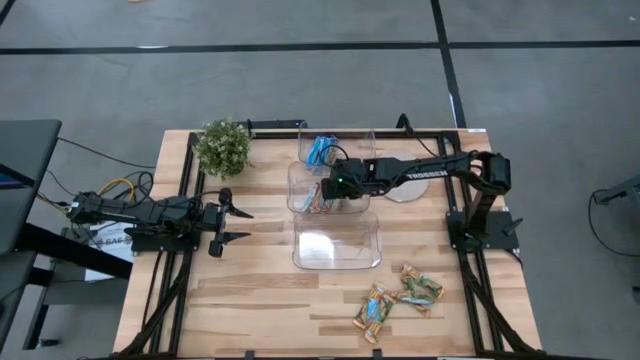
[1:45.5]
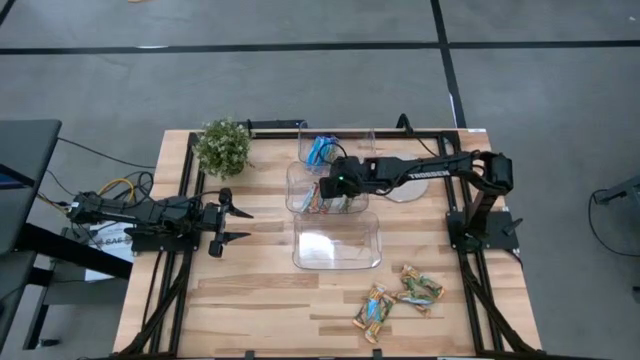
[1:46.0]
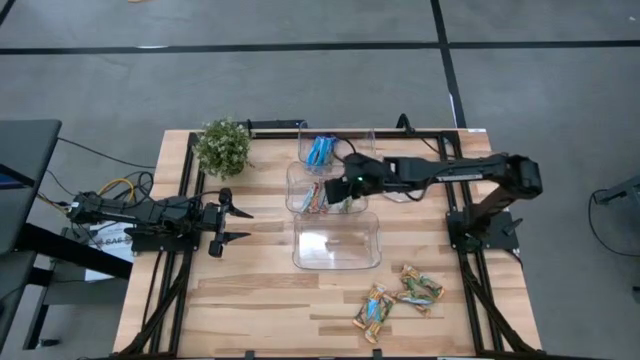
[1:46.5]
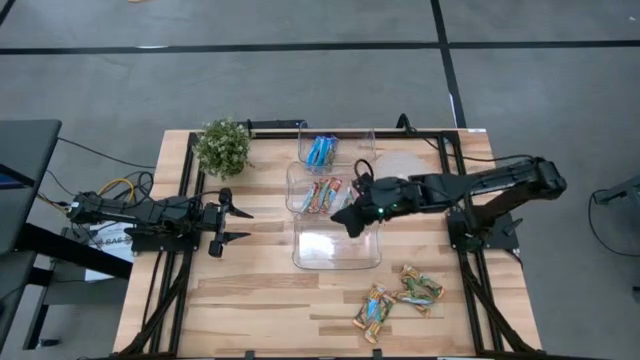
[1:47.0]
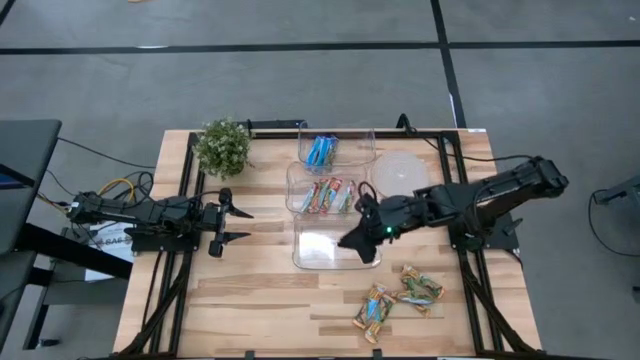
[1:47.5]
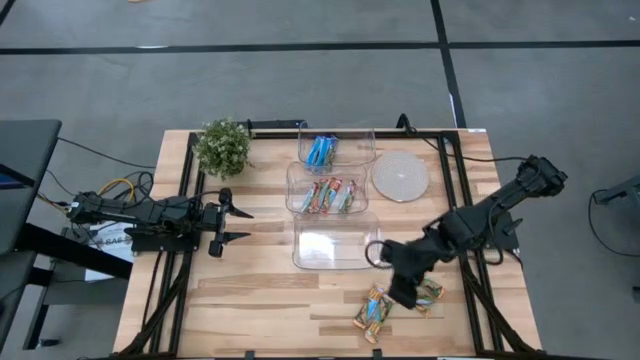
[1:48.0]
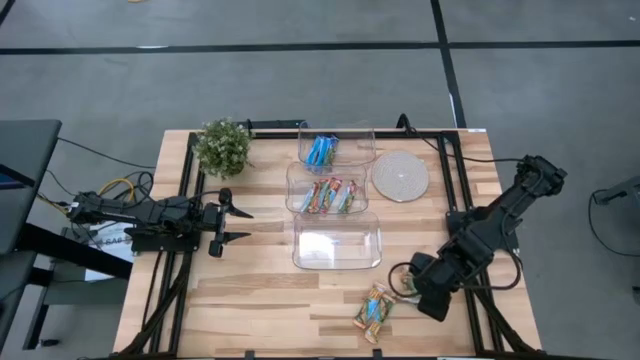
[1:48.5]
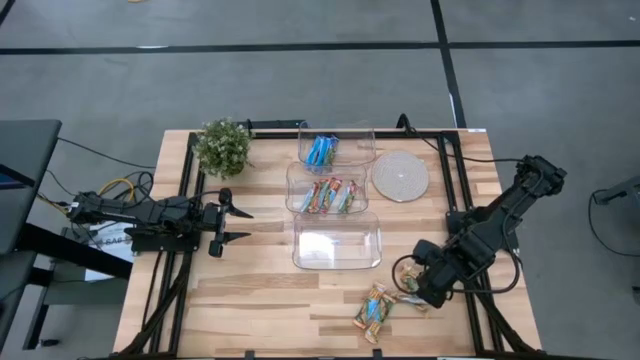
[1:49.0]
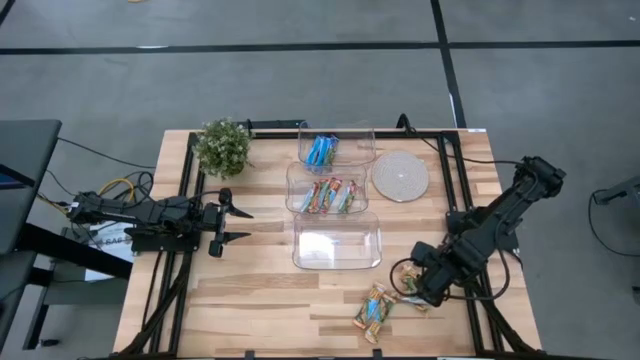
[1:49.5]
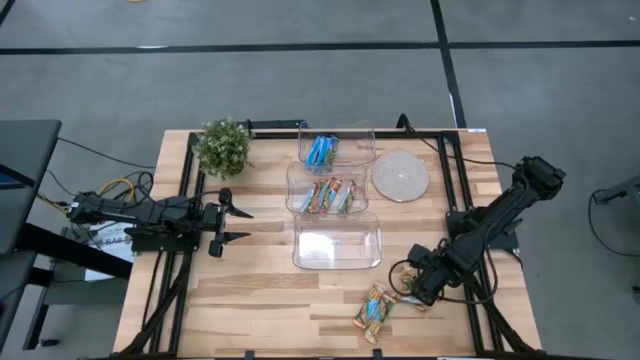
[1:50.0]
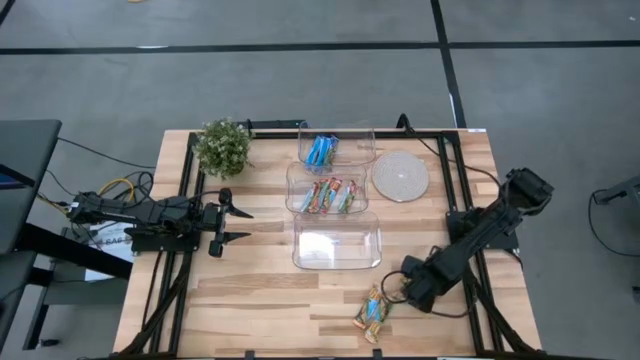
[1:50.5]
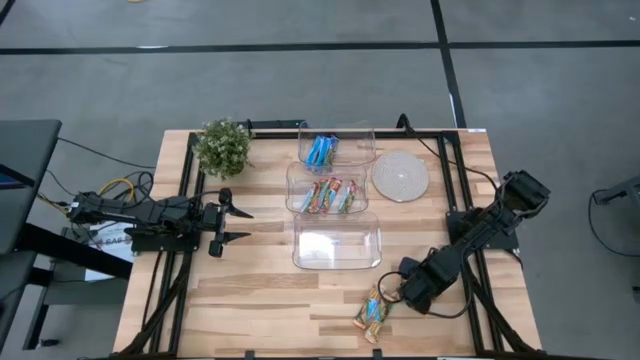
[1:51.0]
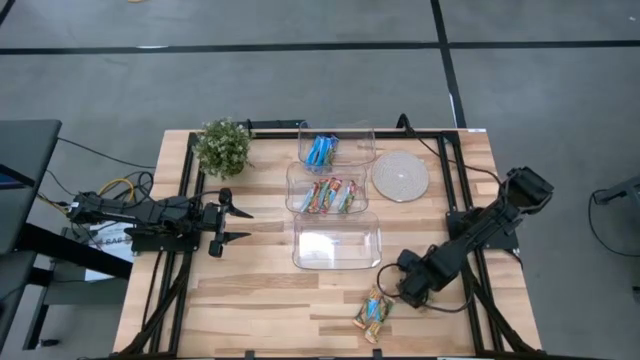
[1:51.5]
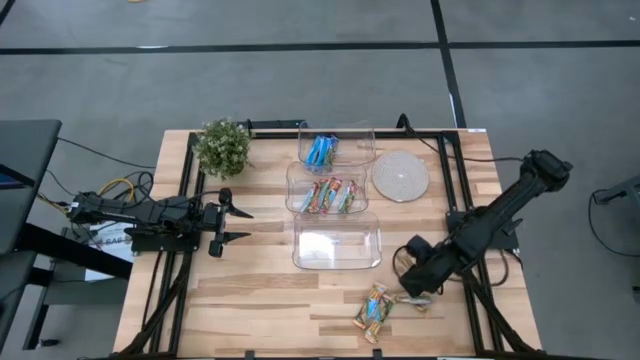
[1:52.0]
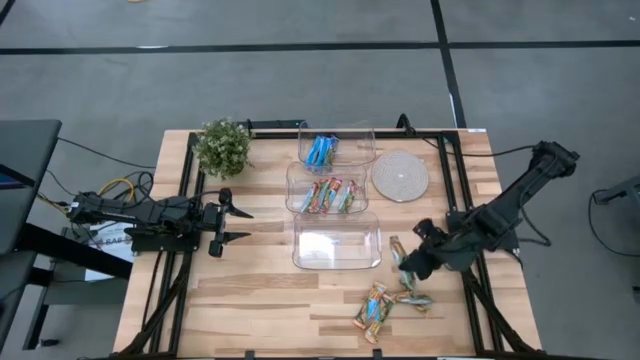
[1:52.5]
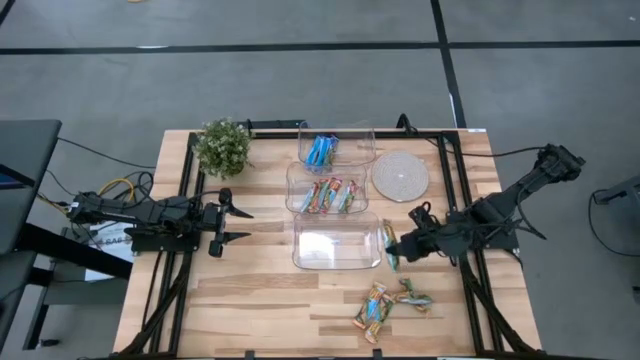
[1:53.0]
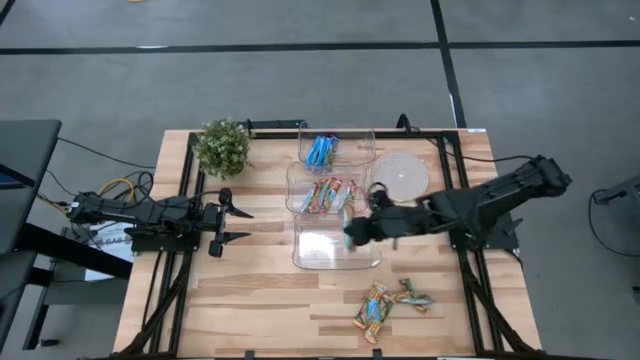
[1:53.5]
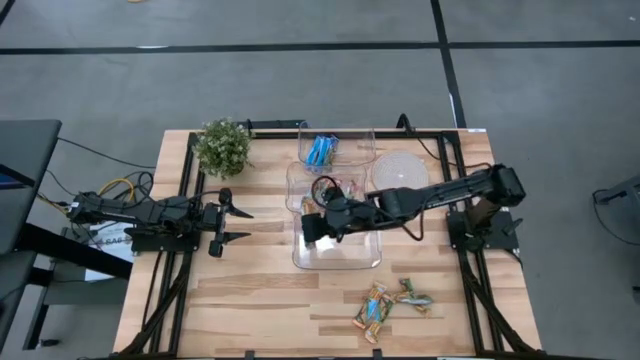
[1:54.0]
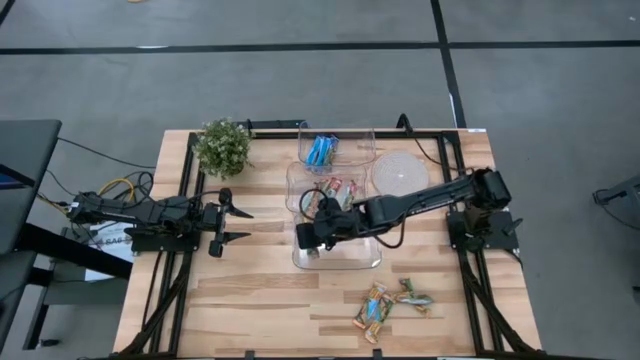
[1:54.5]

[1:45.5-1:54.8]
Task: Pick and place Granola Bars by type
Put the yellow granola bar into the bottom transparent bin

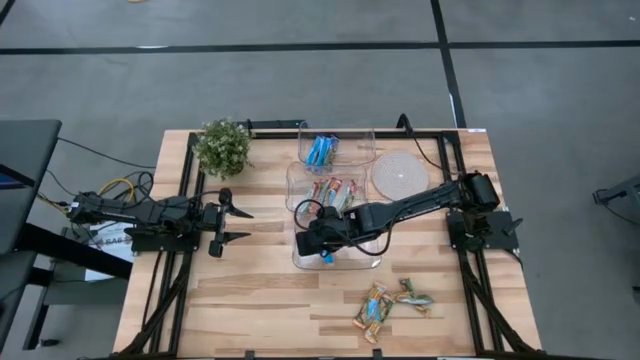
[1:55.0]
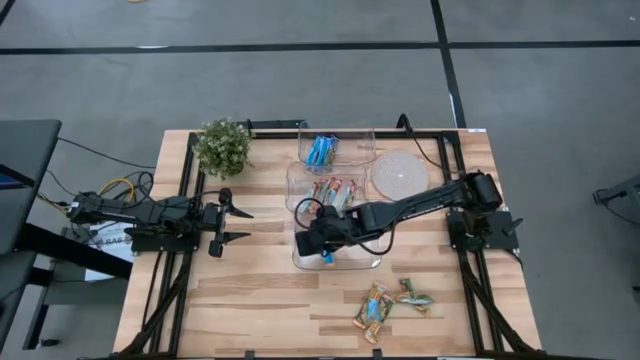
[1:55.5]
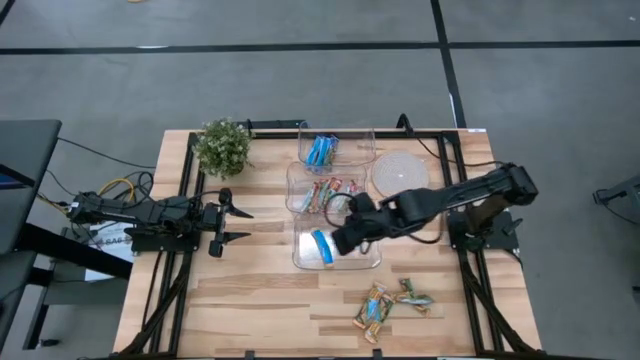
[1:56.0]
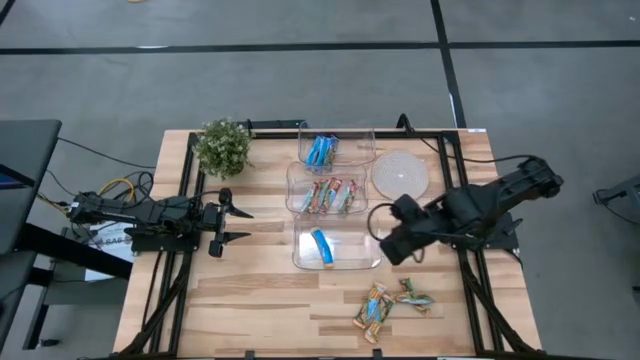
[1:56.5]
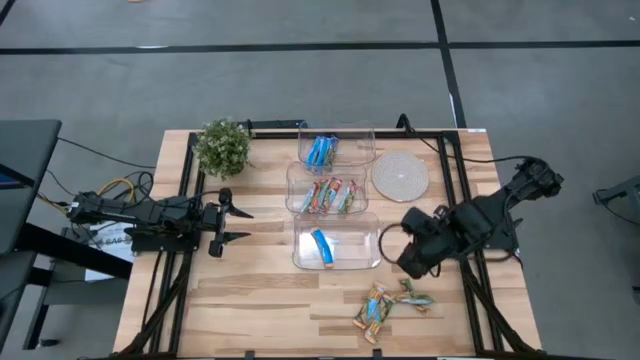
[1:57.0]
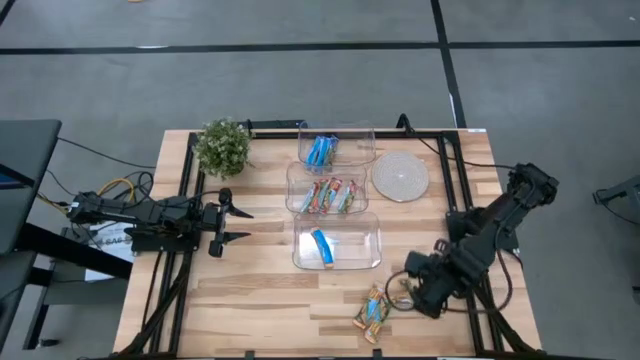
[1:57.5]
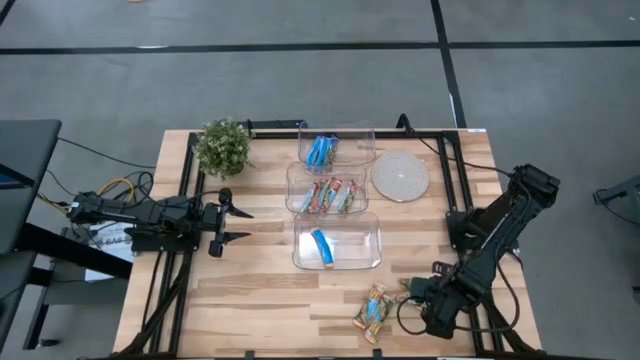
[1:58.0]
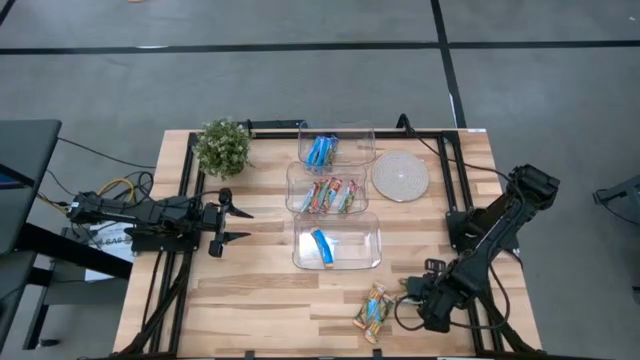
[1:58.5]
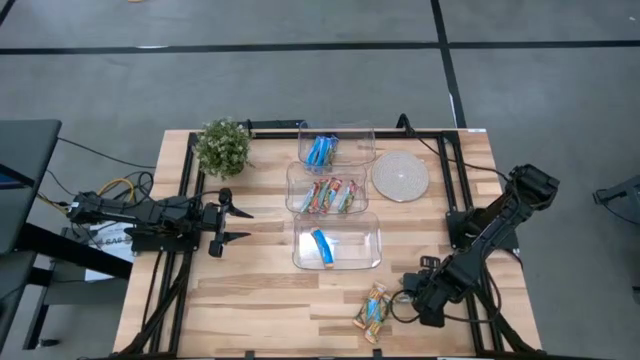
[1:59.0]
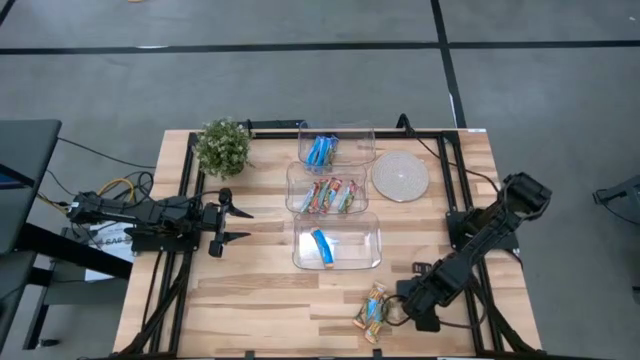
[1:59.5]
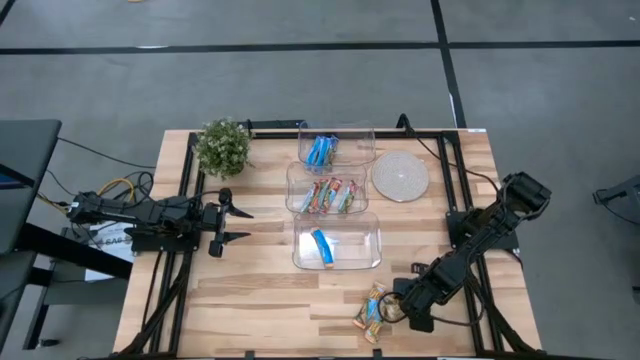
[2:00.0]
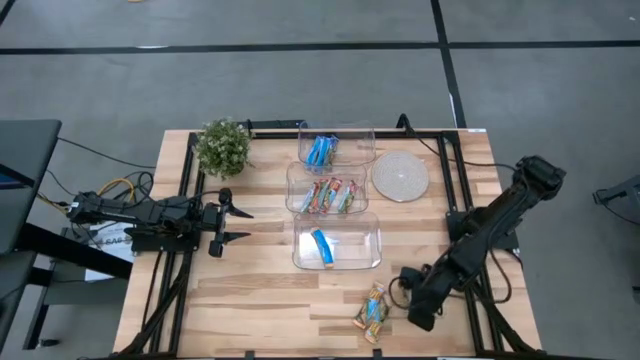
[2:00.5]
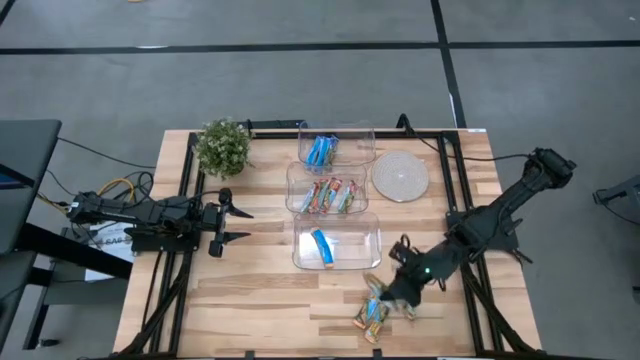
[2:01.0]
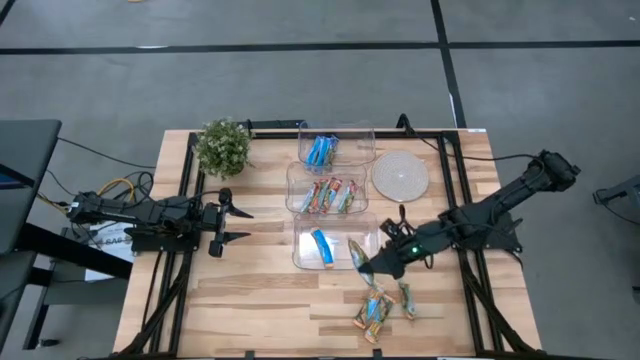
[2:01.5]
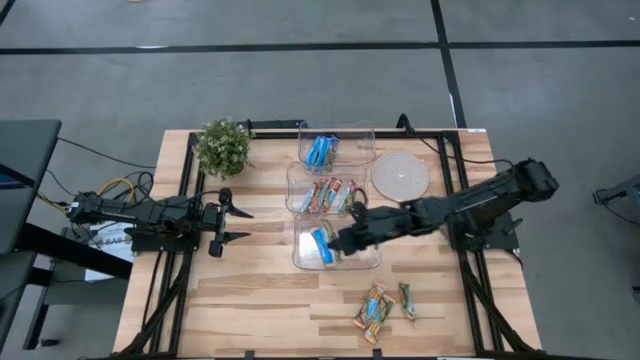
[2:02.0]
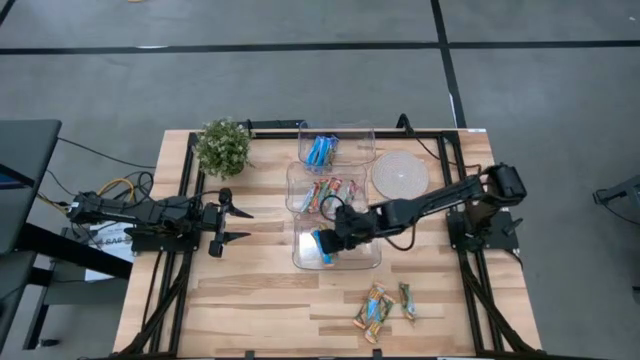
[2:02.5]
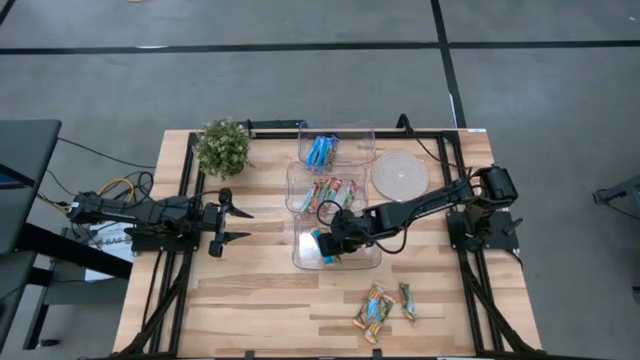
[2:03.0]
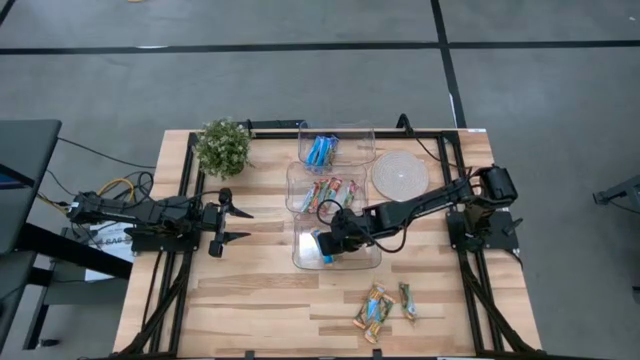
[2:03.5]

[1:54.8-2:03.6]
Put the yellow granola bar into the bottom transparent bin

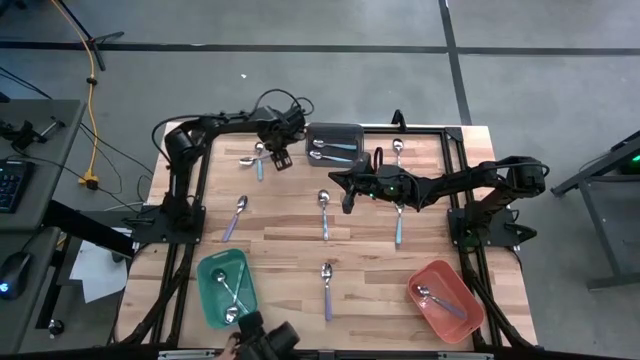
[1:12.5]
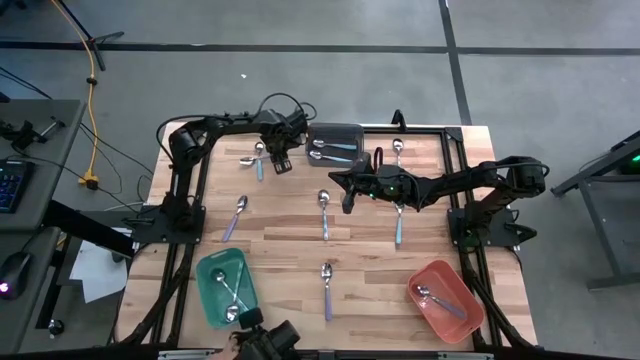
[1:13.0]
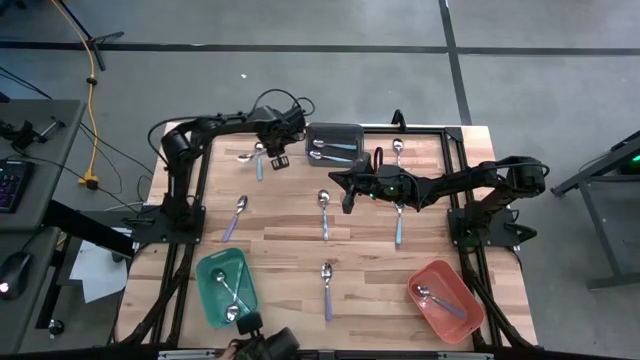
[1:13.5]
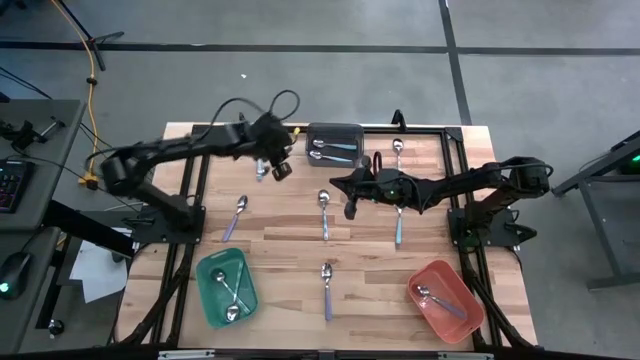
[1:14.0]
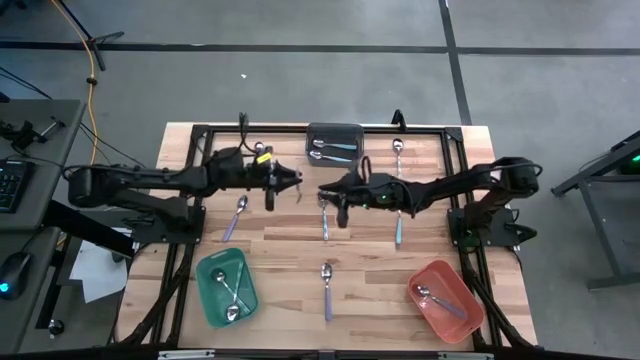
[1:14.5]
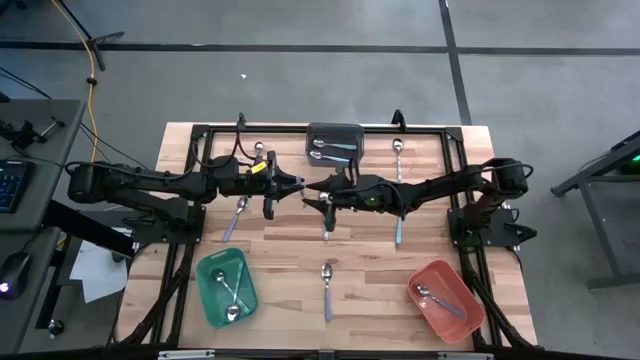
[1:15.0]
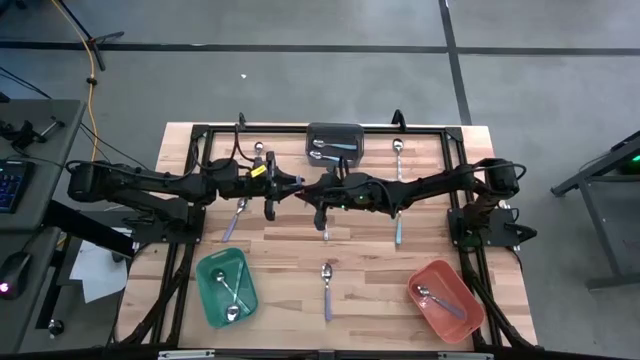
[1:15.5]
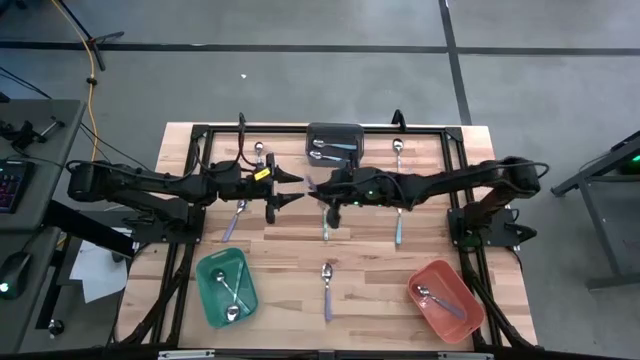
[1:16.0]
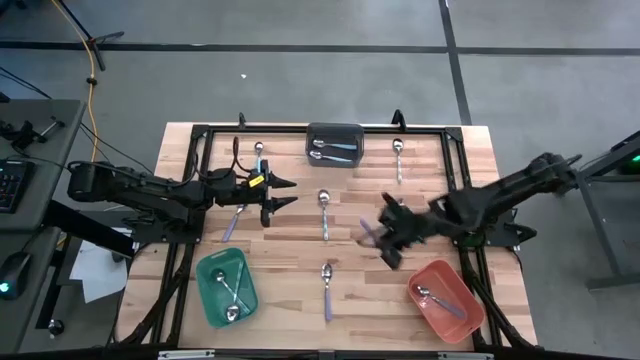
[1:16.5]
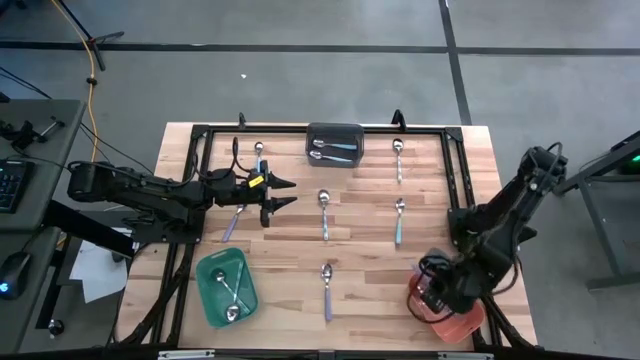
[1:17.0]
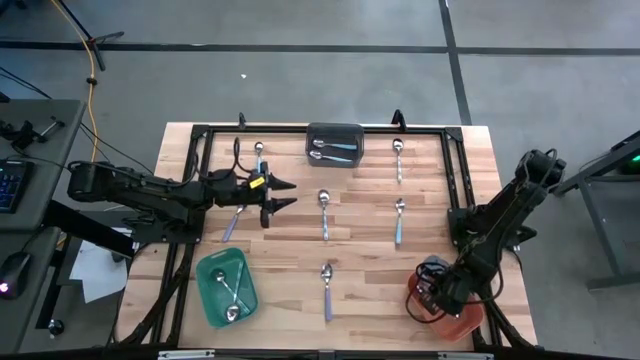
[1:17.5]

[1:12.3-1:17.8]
Task: Sort silverware by color (type)
Put the purple spoon into the orange bin
